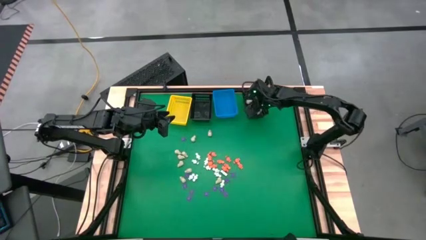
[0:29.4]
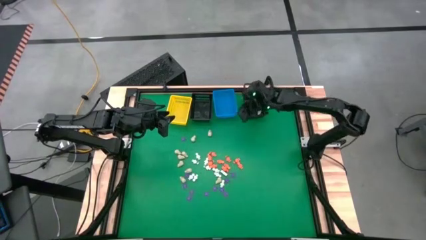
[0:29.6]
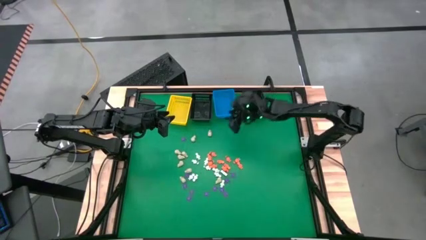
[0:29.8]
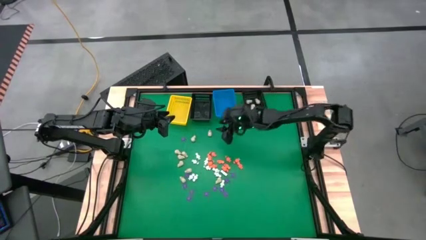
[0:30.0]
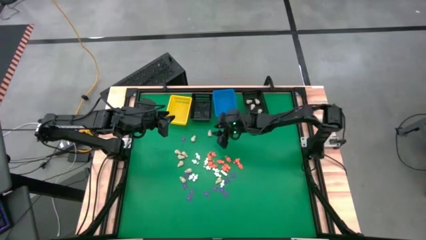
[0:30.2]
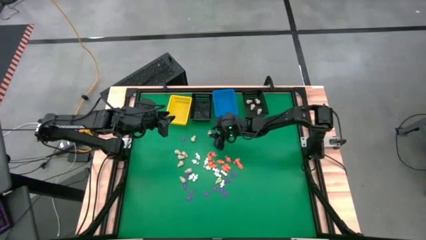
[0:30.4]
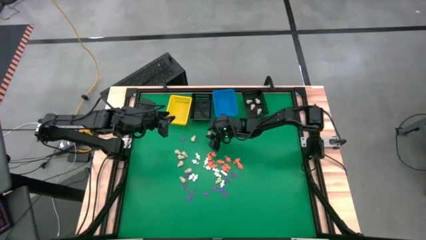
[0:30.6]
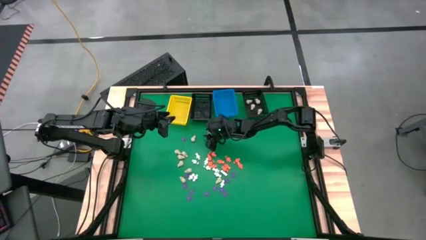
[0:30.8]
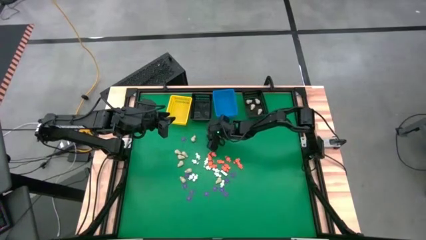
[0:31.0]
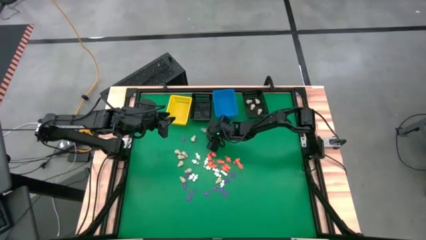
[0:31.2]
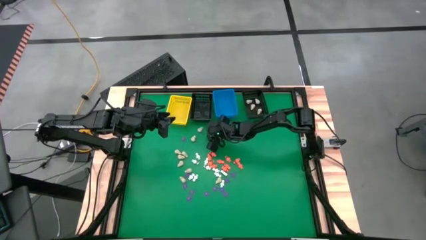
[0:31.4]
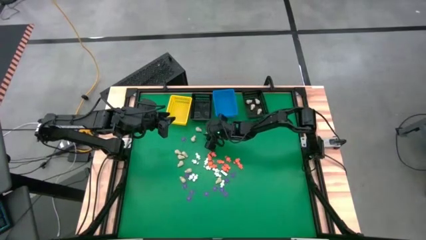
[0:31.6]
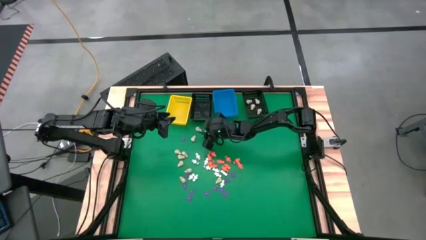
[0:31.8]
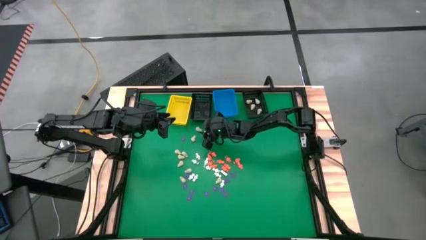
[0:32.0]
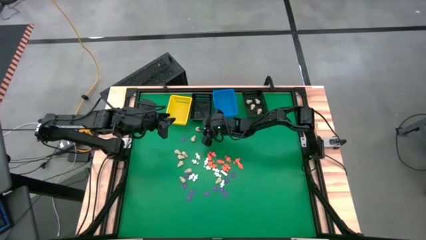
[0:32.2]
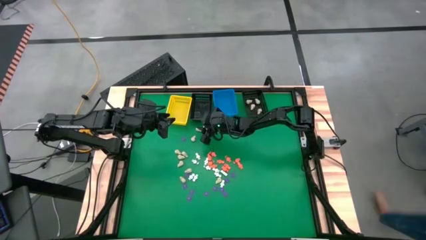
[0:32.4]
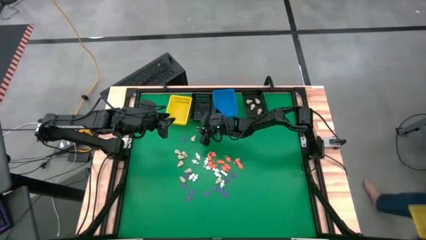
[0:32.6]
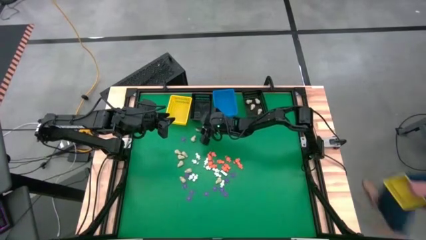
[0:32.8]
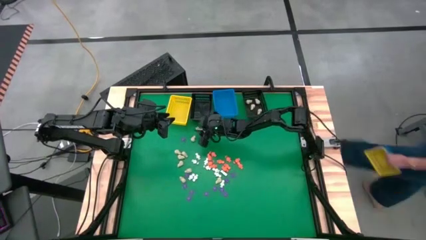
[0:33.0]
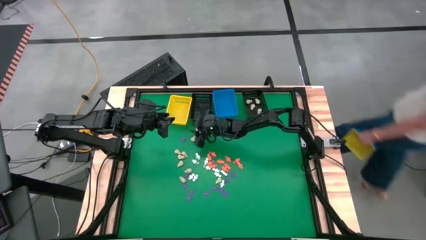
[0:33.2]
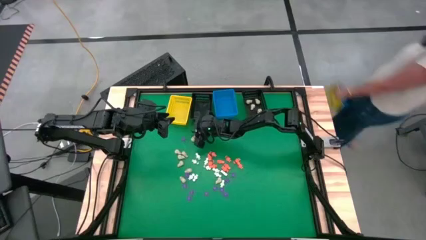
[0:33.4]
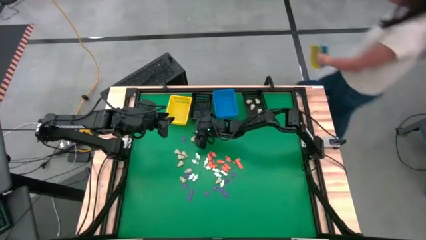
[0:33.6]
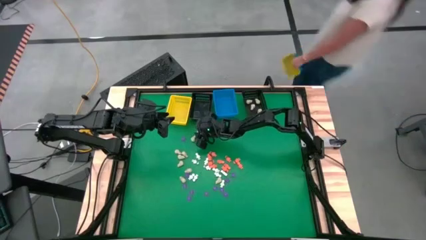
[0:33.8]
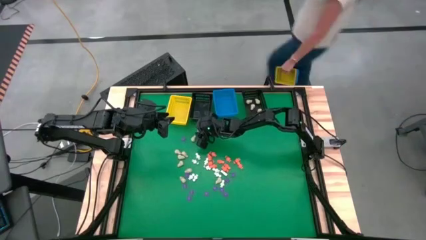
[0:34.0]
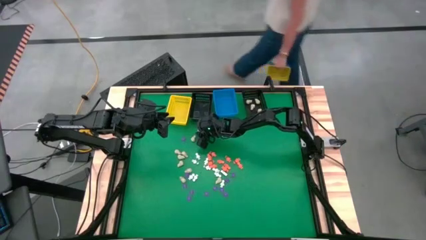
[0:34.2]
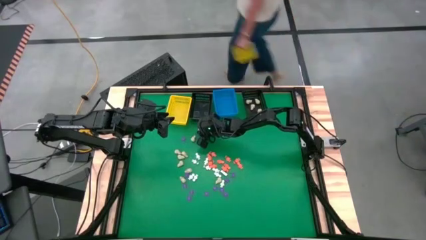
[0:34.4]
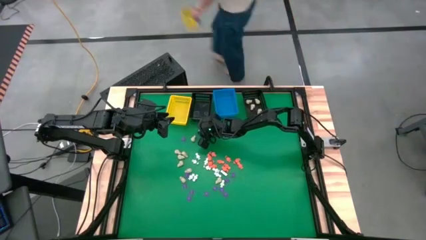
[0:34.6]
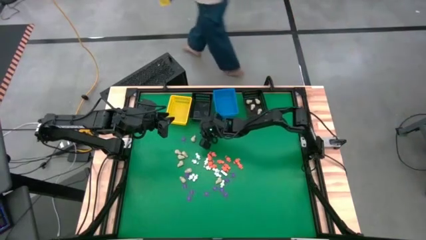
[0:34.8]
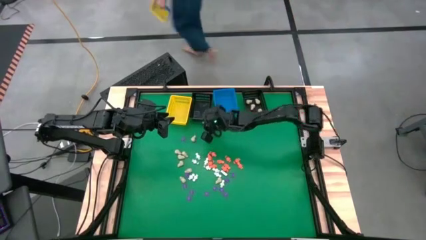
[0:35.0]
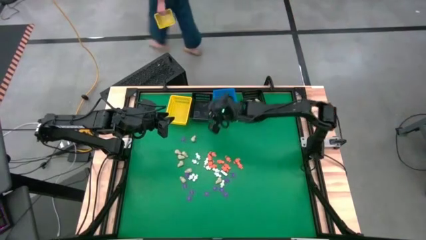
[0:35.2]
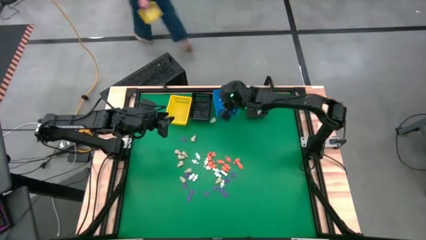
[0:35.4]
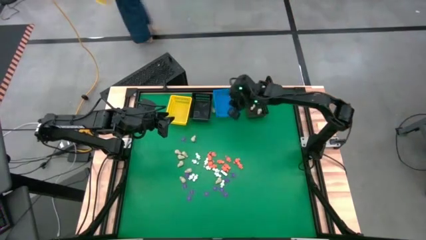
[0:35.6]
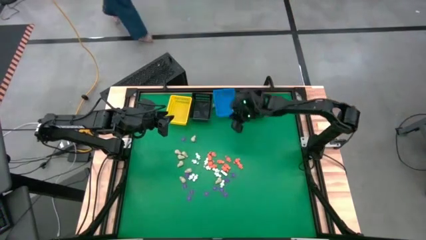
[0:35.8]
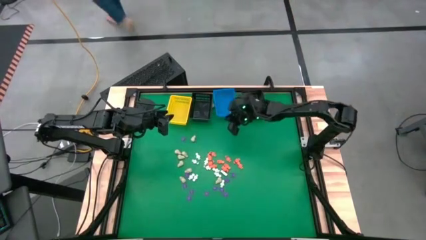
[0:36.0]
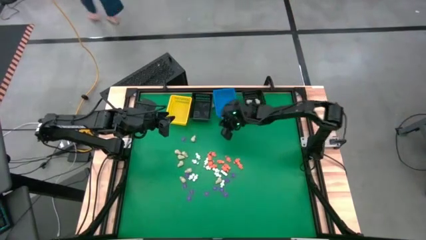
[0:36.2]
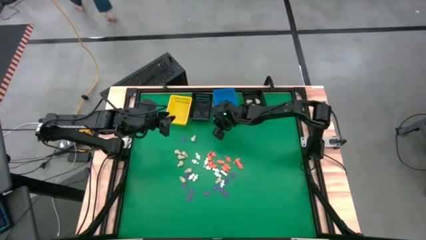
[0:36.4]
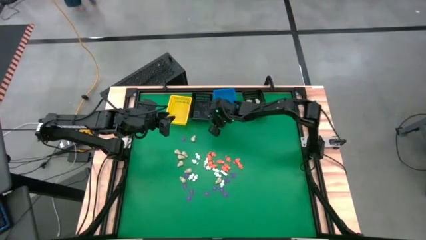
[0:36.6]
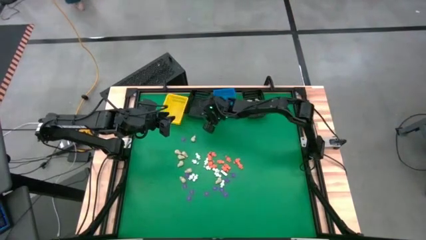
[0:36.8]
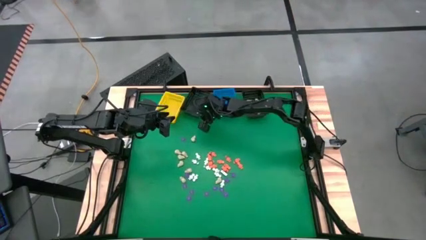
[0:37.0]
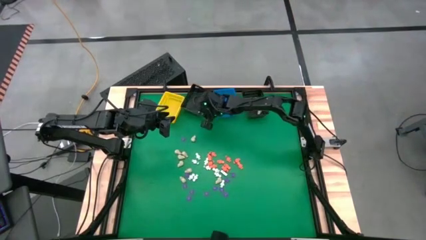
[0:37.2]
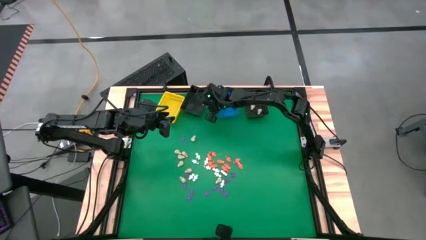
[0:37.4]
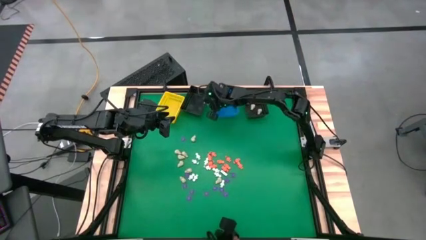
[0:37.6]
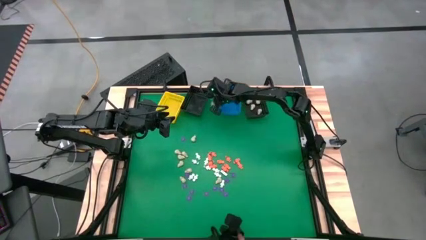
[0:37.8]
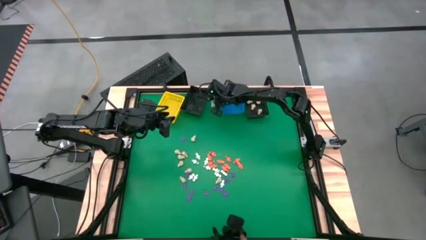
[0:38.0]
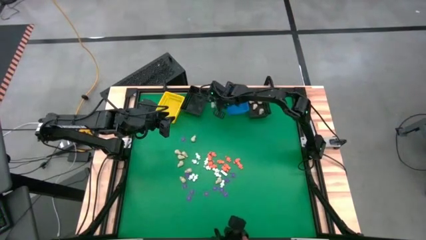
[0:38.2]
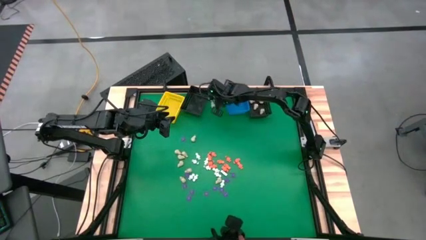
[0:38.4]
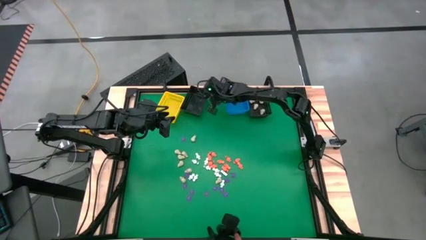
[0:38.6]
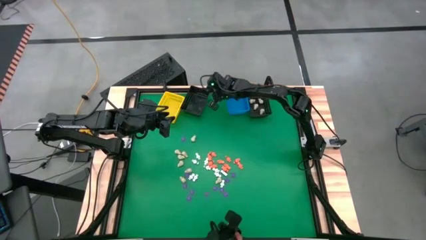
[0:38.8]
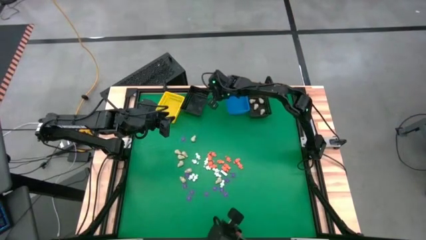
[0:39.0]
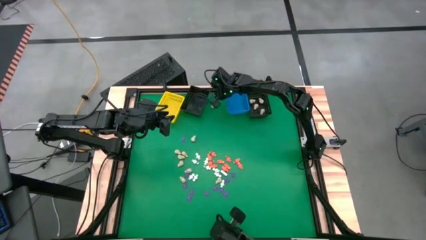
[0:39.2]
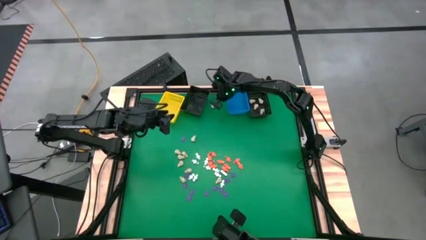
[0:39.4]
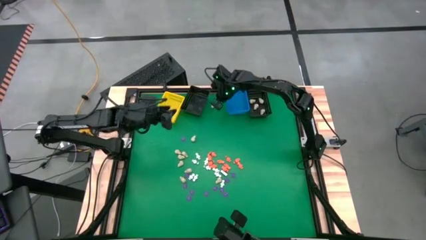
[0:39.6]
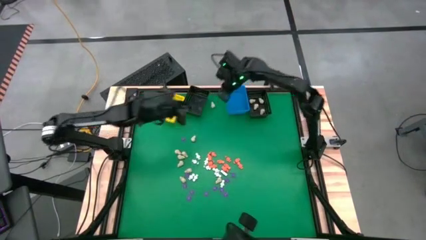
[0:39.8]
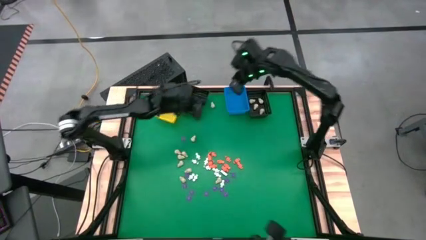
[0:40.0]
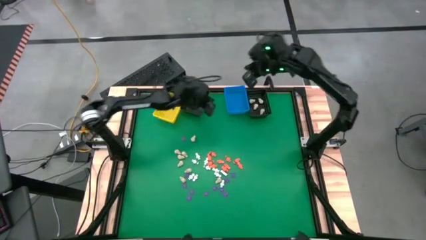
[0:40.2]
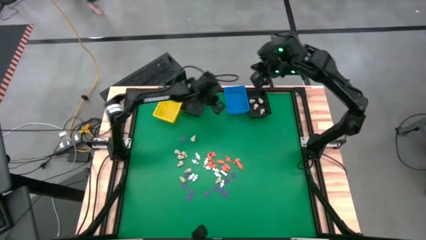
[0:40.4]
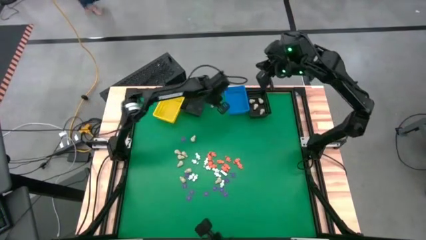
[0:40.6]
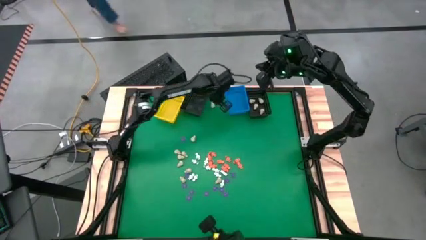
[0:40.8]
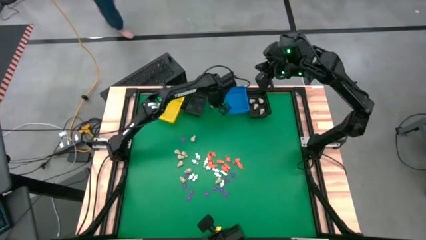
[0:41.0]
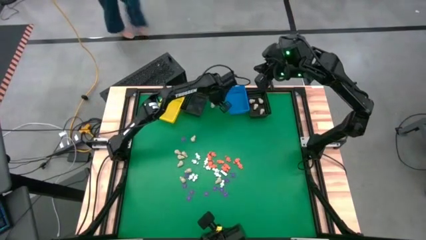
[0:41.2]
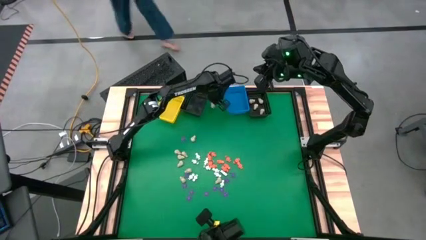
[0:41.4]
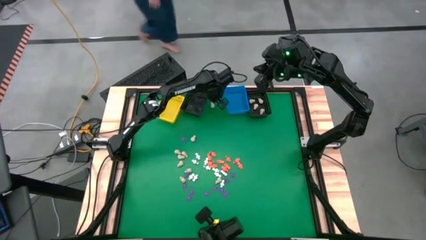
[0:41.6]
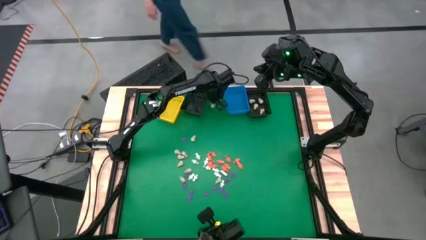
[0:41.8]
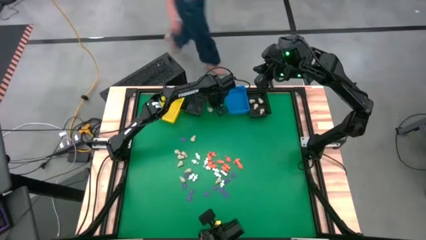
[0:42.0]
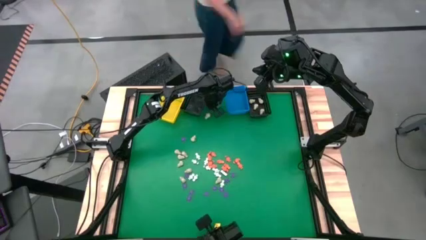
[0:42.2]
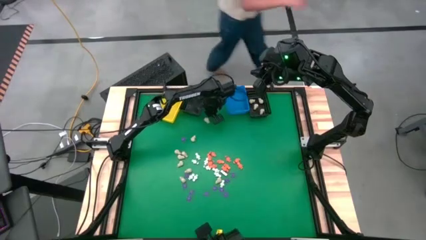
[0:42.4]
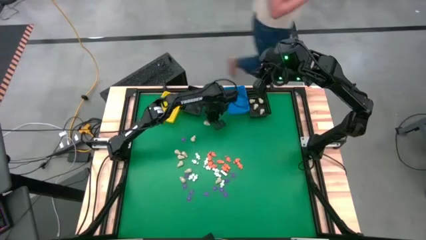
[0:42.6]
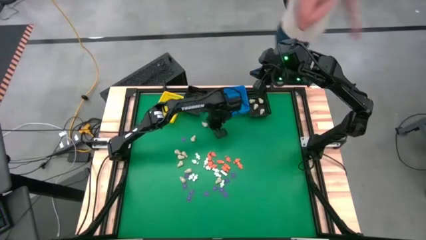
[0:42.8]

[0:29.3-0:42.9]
Task: Sort Halloween decoration
Put the white skull toy into the right black basket

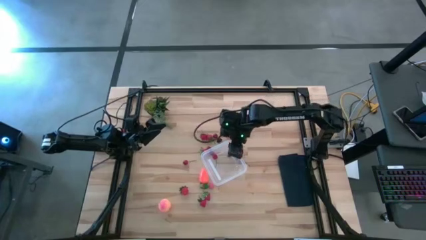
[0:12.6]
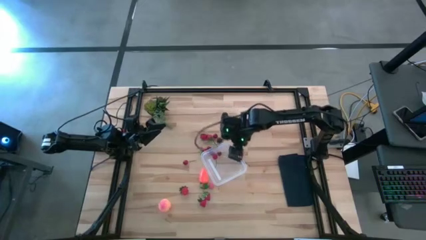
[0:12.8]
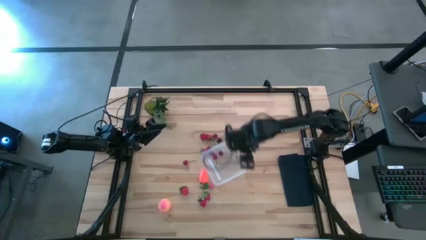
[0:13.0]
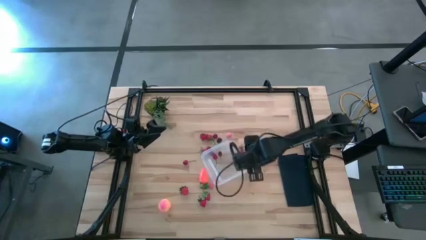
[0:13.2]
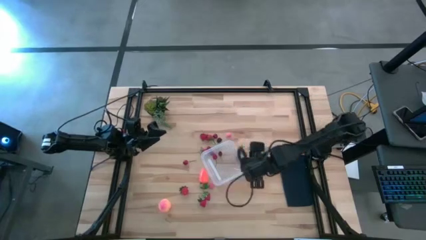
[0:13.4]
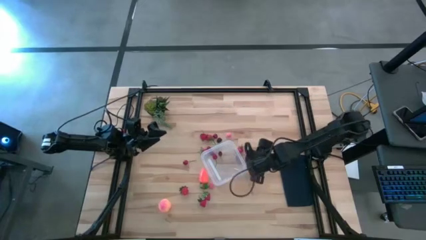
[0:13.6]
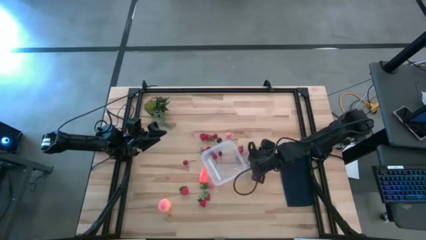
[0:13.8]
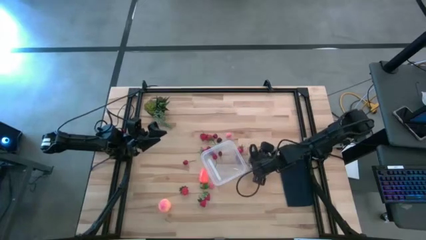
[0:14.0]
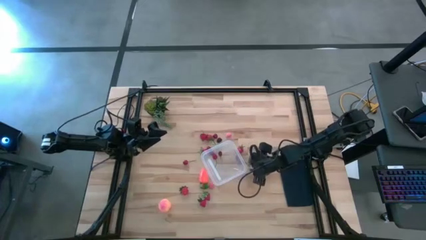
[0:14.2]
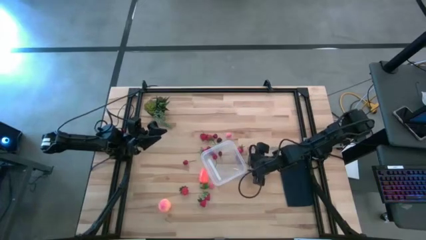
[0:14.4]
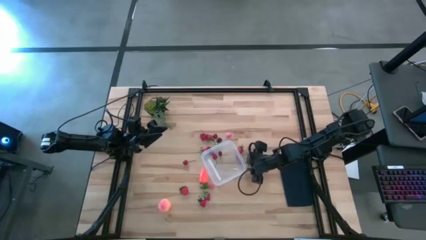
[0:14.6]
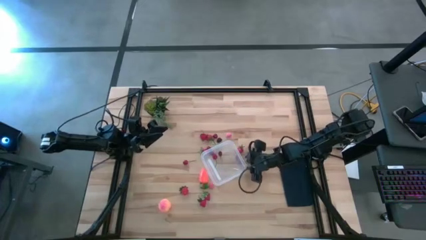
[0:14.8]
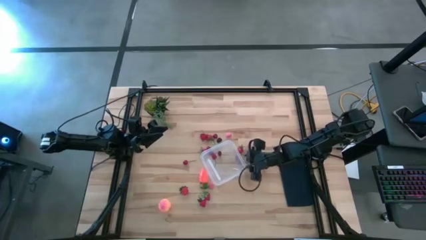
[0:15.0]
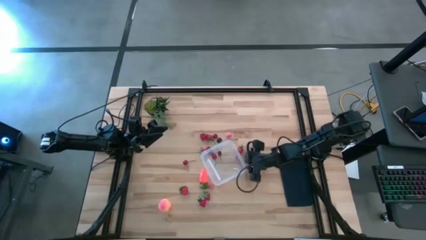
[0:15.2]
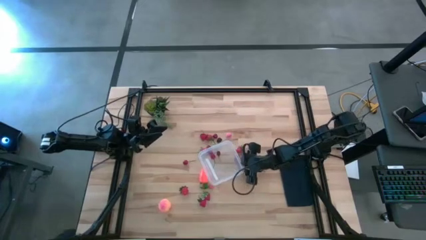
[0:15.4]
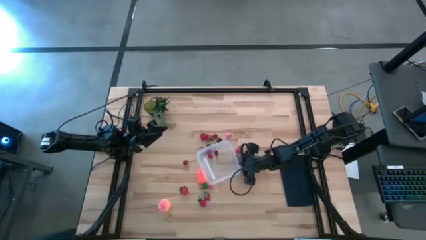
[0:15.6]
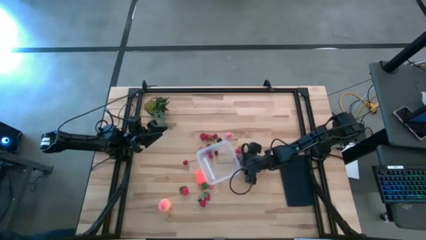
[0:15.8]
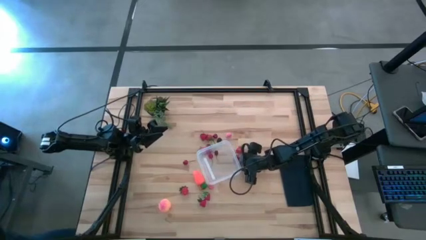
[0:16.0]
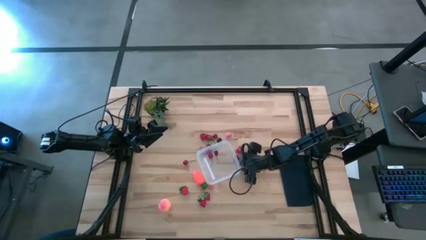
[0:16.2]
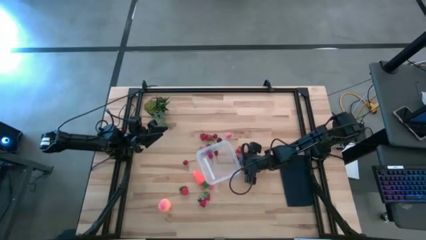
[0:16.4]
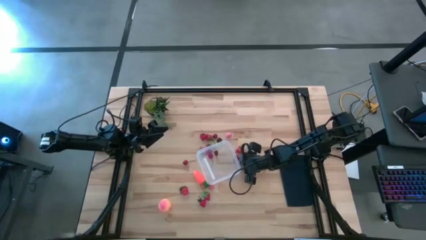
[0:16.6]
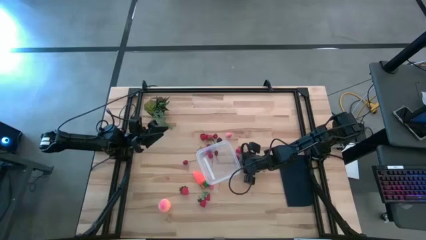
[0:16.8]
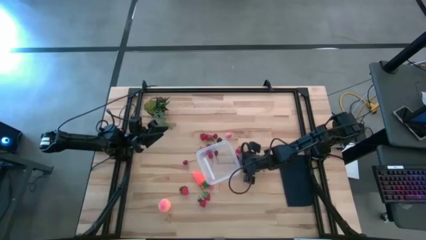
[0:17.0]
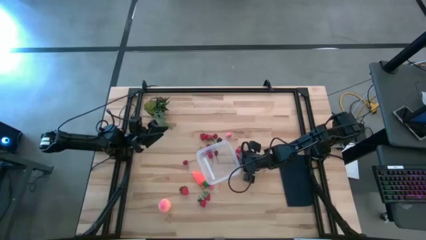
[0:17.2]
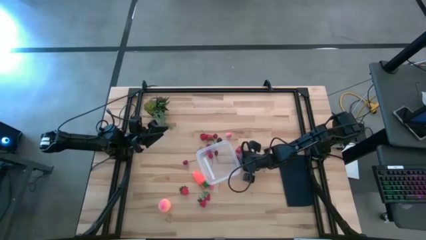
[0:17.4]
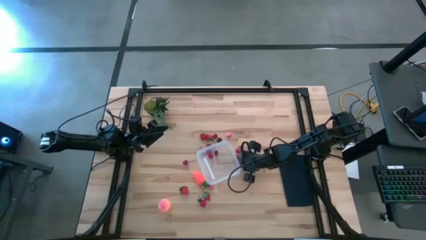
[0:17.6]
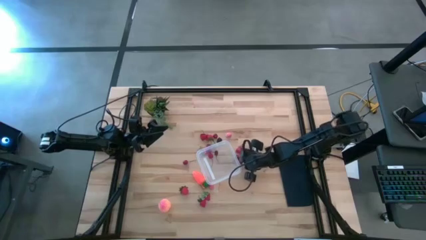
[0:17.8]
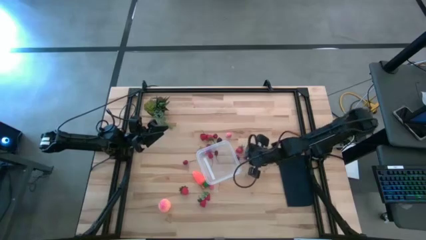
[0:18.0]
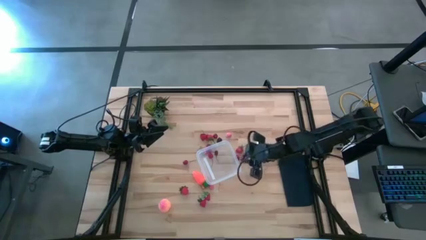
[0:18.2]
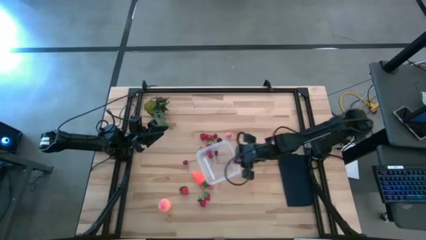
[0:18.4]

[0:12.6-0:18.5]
Task: Pick and placing Produce into tupperware
Put the cherry into the transparent container
